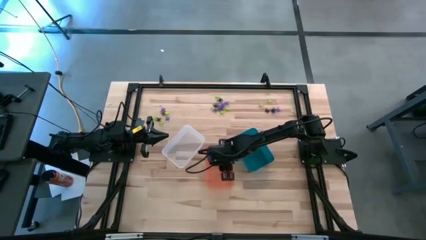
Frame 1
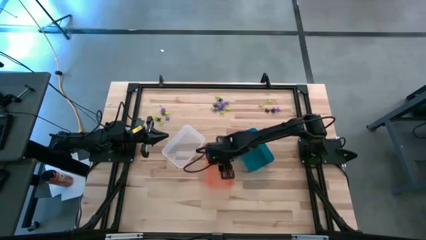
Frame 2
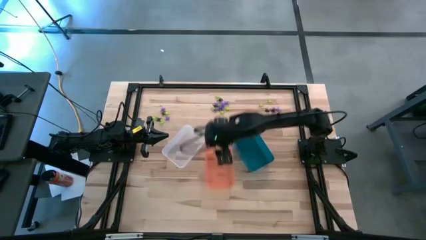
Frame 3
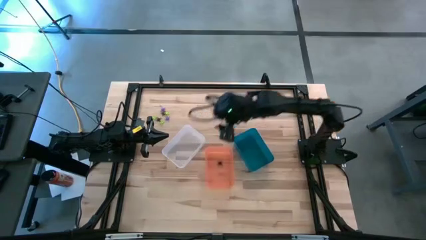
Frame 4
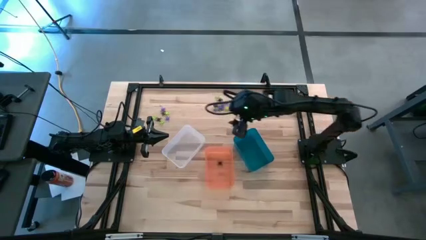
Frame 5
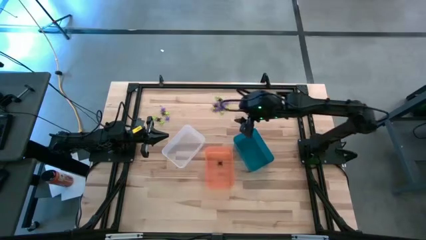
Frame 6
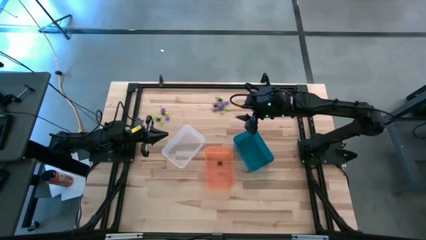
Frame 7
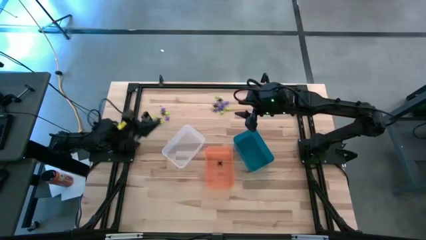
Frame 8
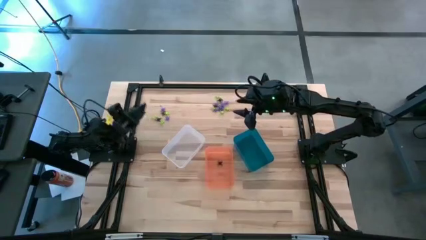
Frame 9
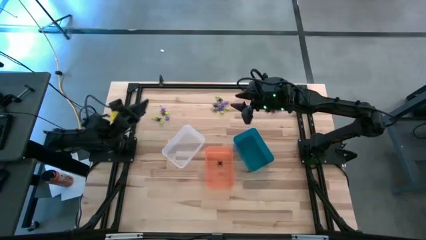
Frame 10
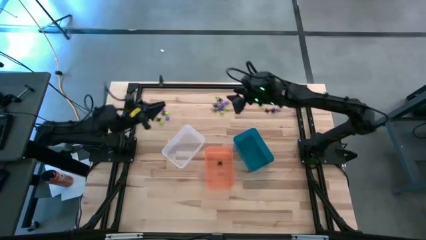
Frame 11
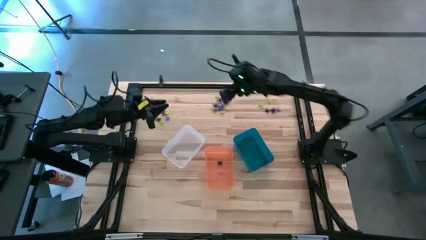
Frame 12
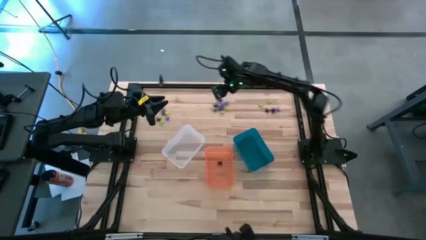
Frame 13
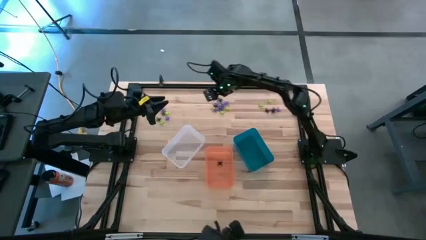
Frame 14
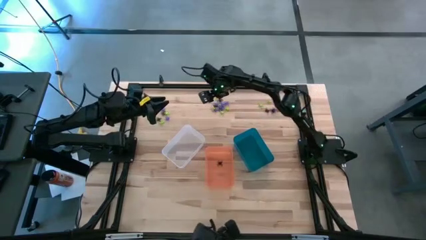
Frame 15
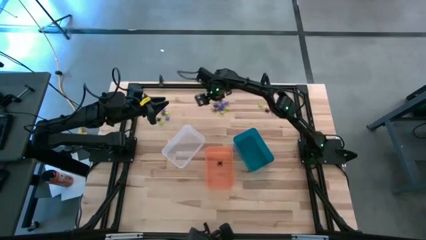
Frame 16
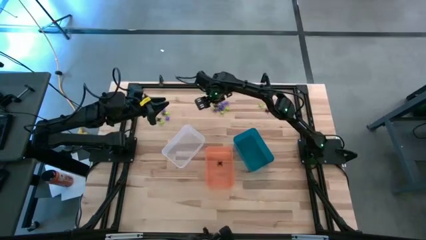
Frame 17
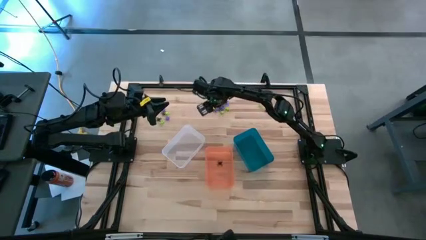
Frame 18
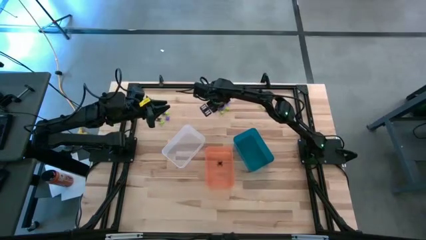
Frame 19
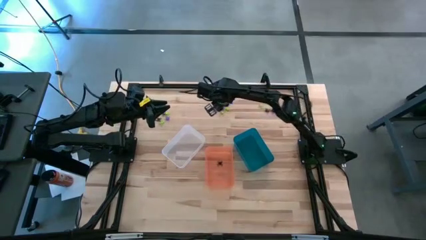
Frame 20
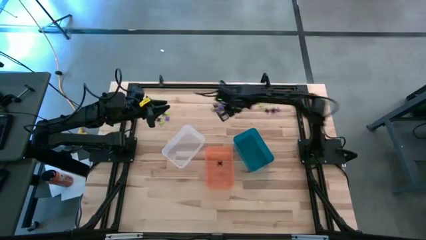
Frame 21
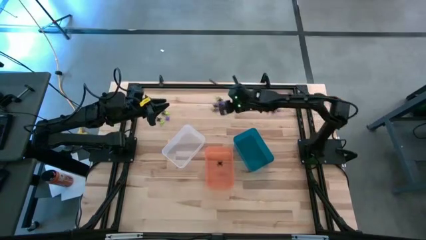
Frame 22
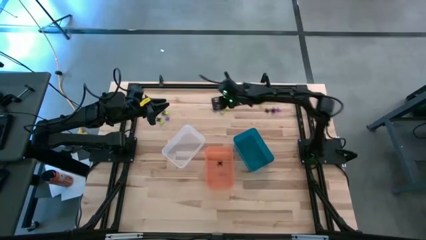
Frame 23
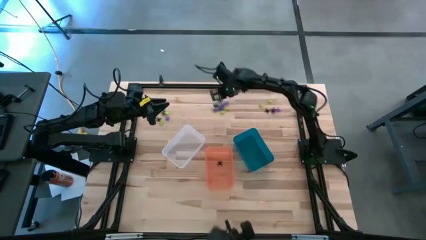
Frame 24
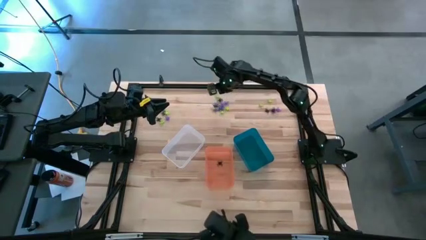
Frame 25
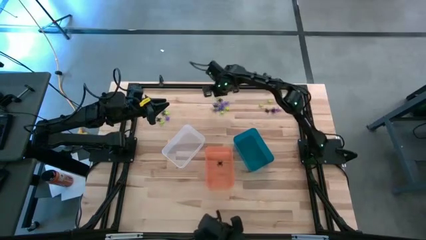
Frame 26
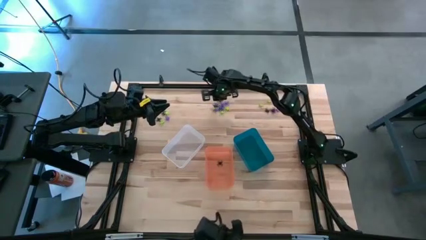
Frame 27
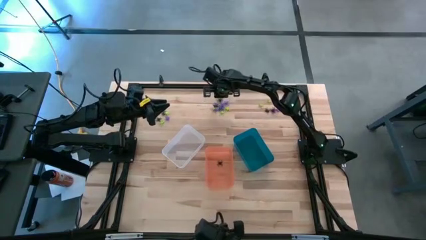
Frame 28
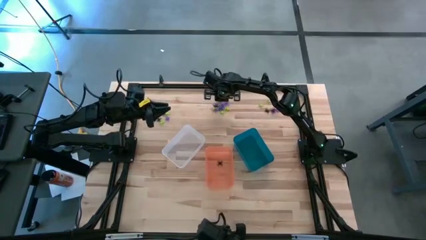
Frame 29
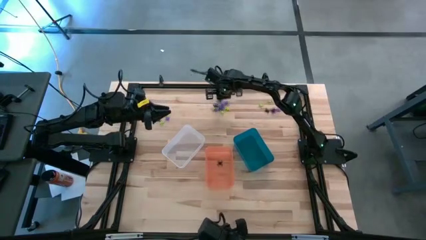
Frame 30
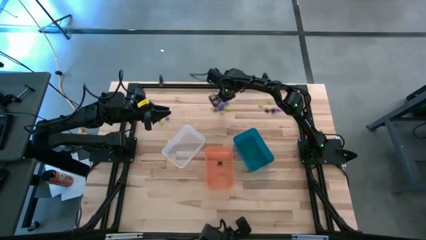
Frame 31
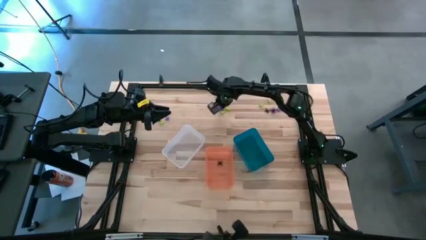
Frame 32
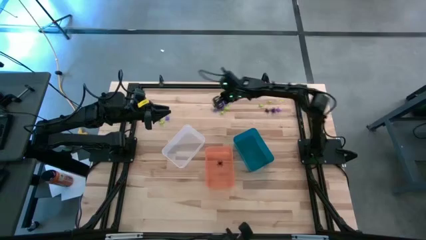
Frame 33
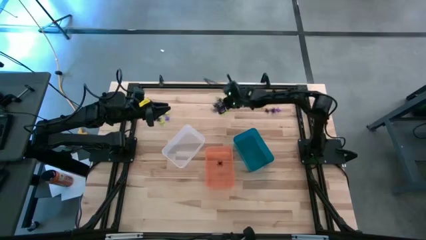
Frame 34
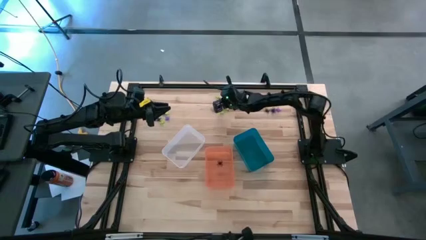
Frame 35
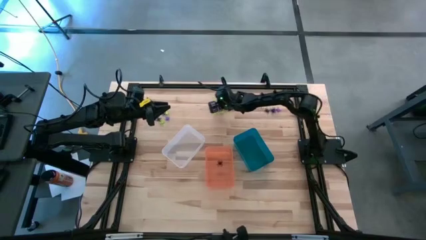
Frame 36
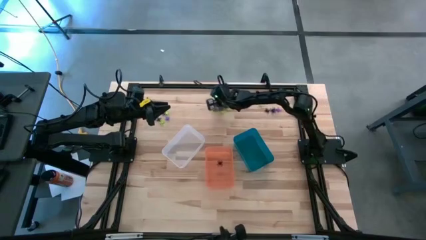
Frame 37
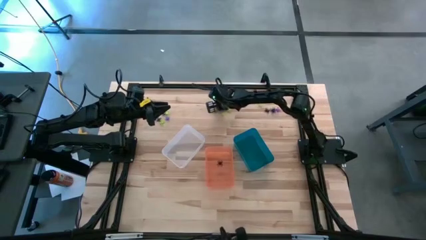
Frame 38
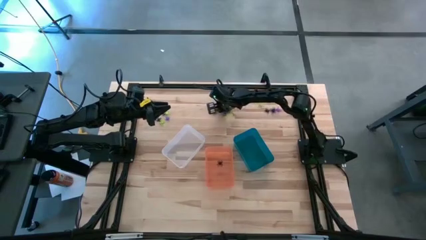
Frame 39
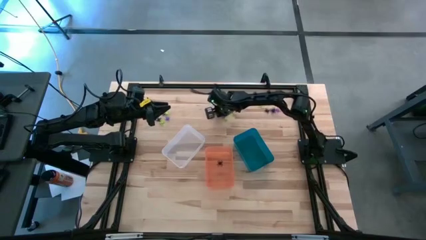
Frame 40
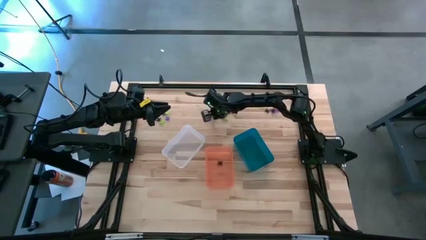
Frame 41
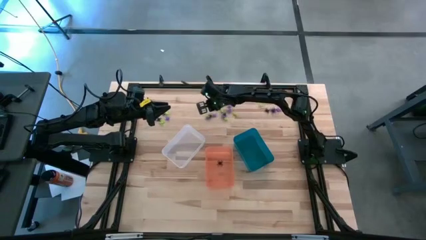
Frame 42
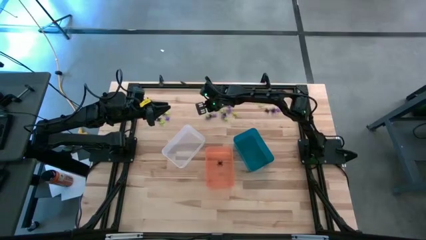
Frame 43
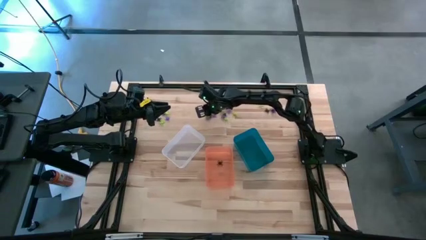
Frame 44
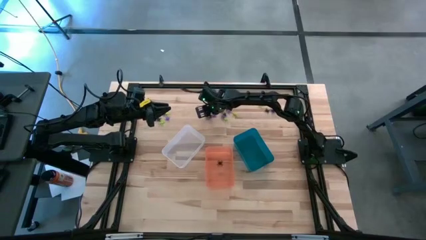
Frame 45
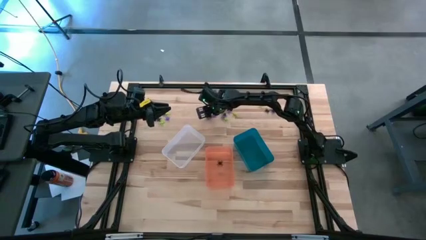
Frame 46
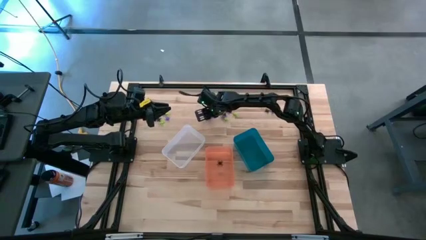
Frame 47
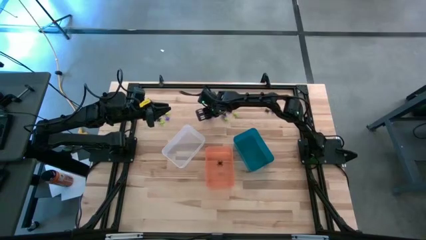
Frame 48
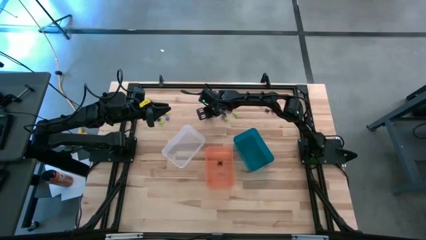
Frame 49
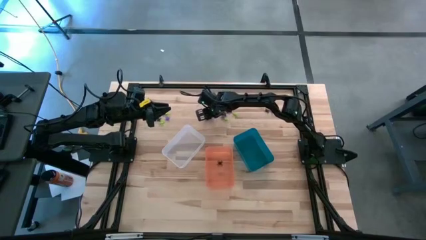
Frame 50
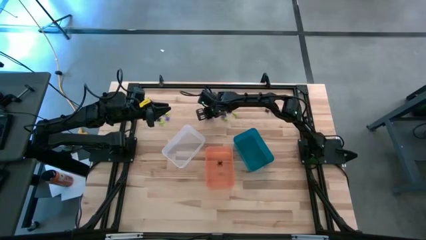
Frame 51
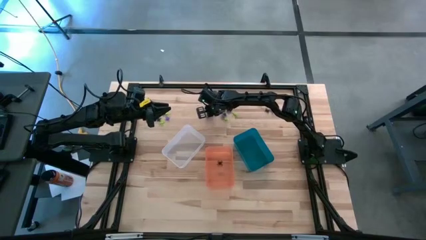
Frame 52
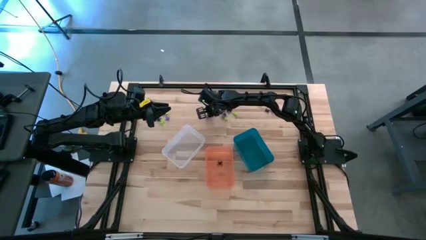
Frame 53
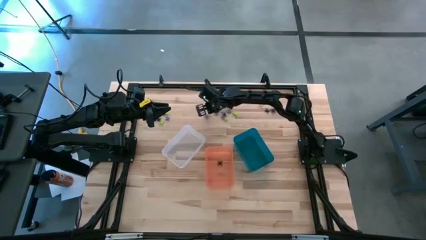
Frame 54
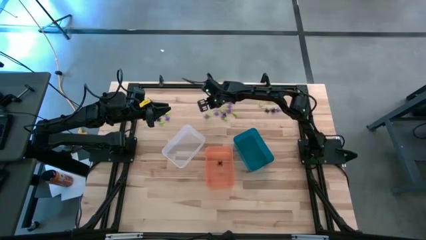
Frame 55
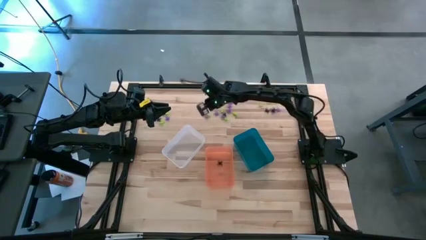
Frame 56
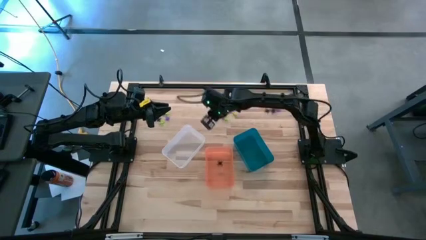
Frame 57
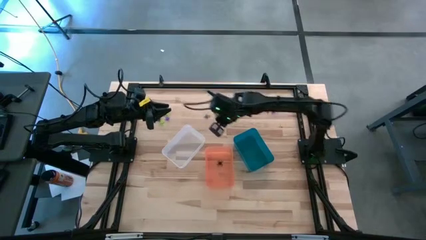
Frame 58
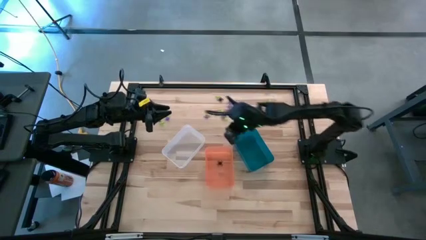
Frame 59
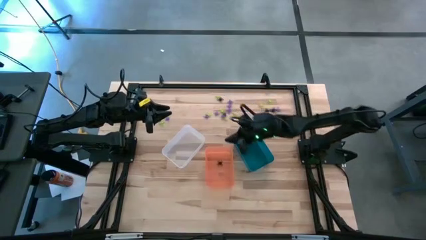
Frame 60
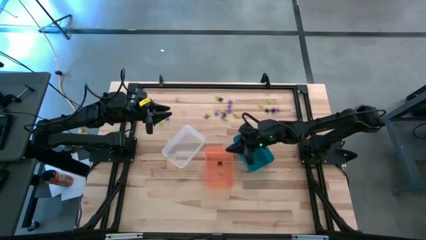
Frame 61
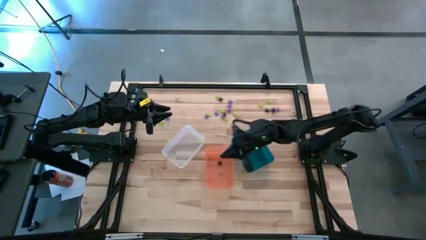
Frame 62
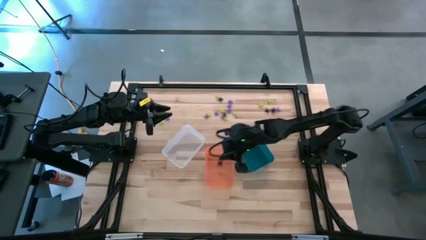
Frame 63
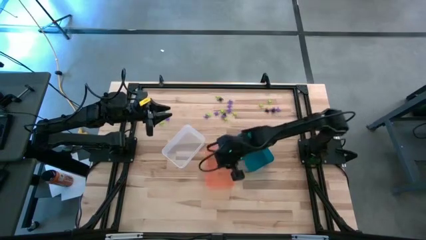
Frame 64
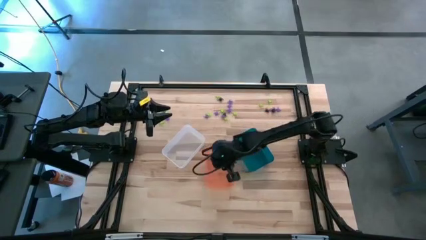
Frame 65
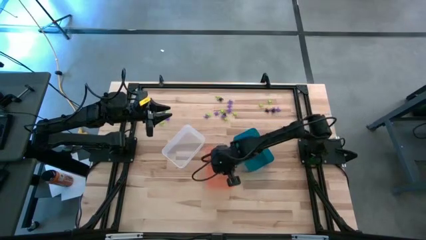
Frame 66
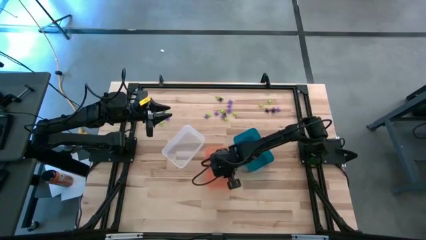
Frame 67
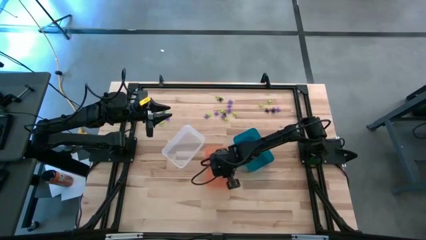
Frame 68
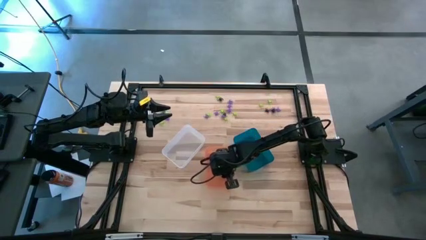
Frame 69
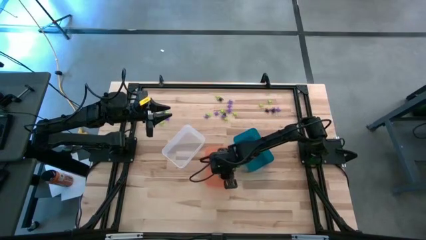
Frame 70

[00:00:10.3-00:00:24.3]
Task: Sort Halloween decoration
Put the black spider toy into the orange bin
